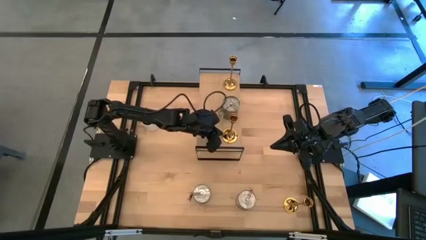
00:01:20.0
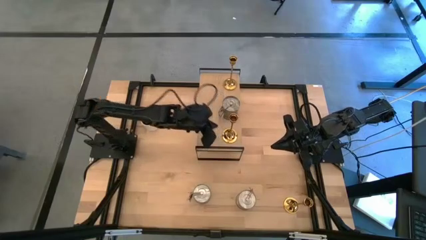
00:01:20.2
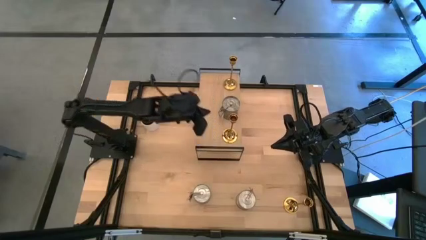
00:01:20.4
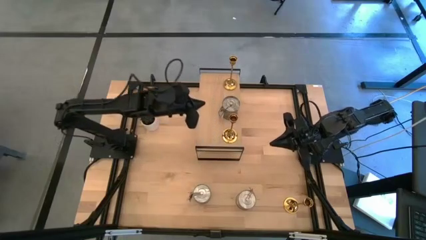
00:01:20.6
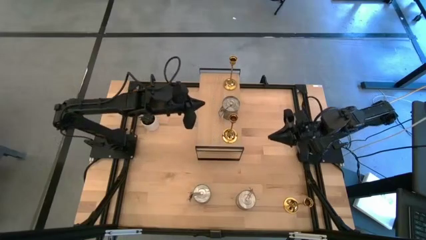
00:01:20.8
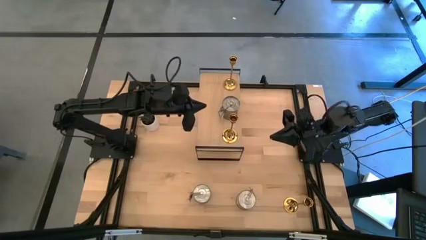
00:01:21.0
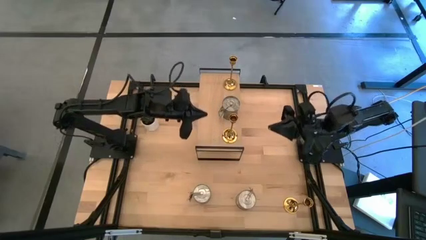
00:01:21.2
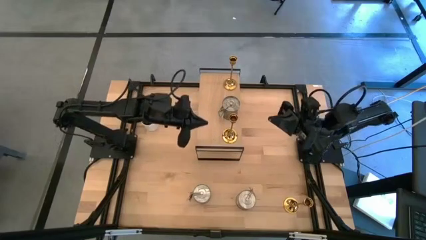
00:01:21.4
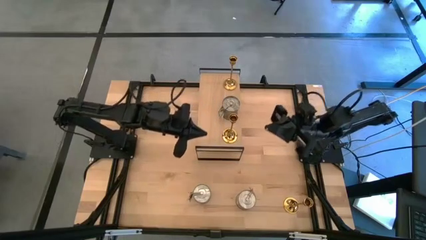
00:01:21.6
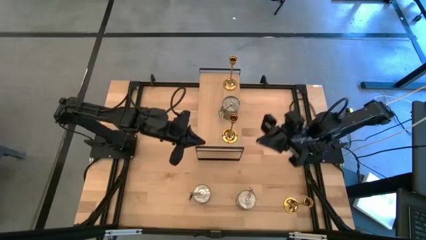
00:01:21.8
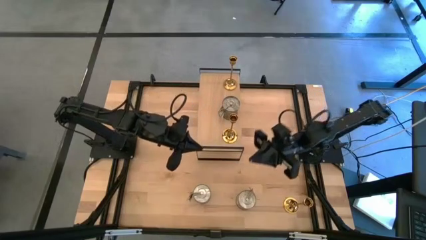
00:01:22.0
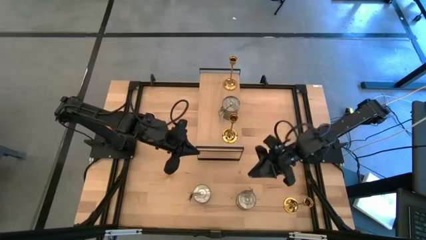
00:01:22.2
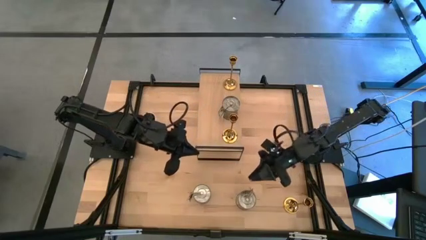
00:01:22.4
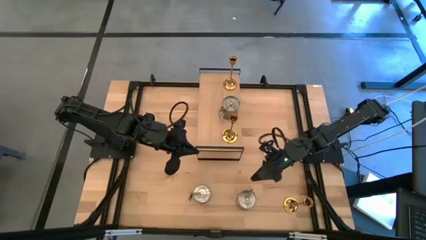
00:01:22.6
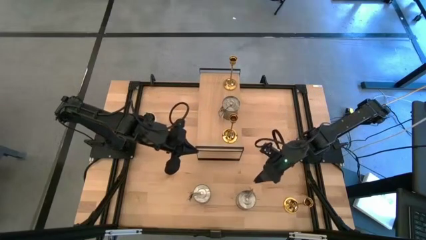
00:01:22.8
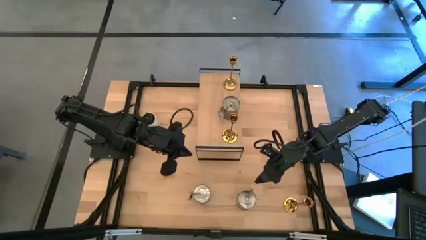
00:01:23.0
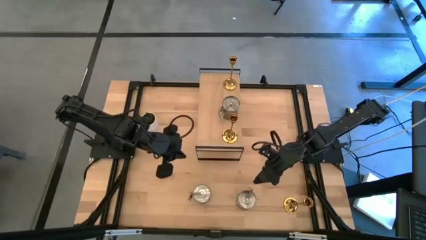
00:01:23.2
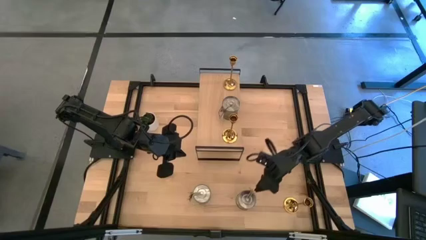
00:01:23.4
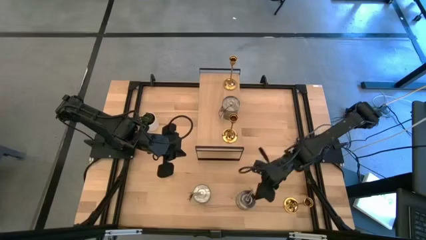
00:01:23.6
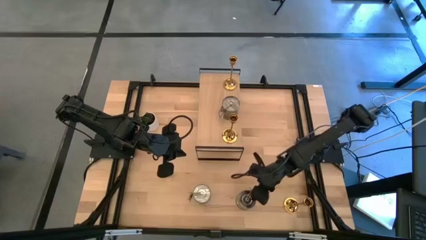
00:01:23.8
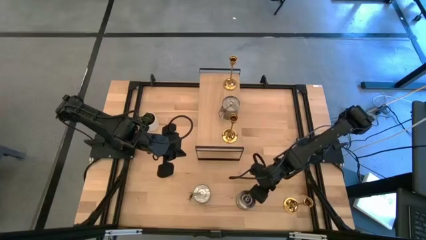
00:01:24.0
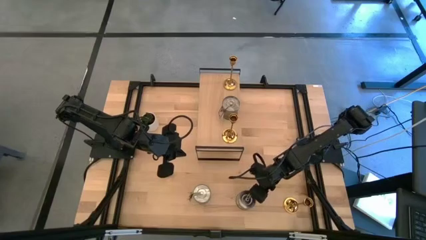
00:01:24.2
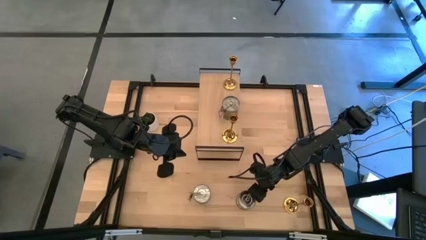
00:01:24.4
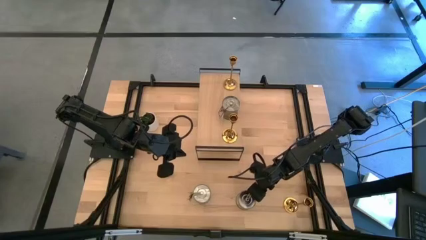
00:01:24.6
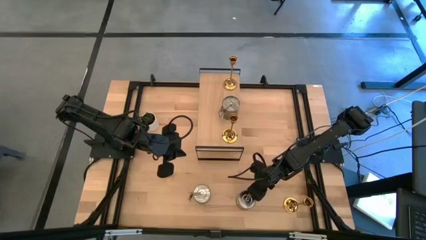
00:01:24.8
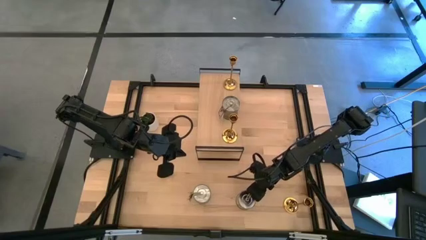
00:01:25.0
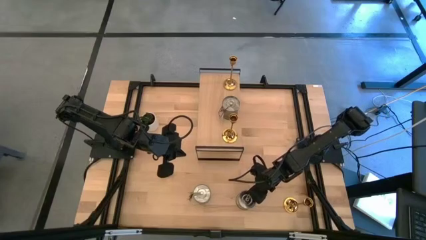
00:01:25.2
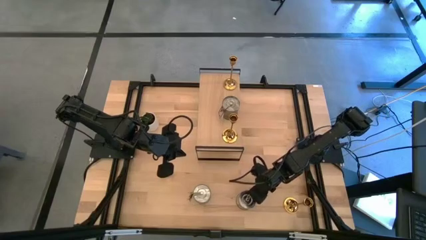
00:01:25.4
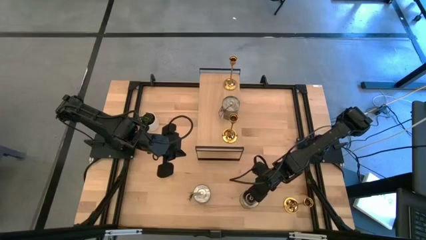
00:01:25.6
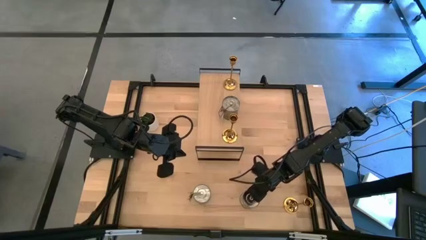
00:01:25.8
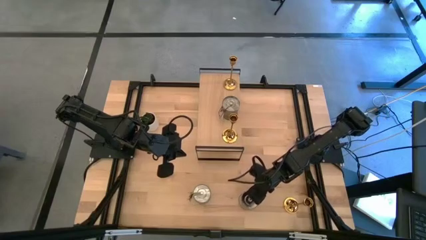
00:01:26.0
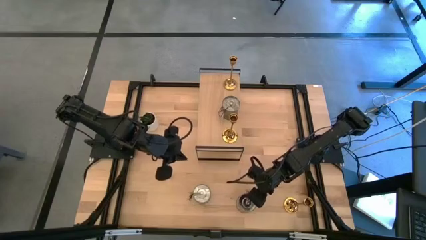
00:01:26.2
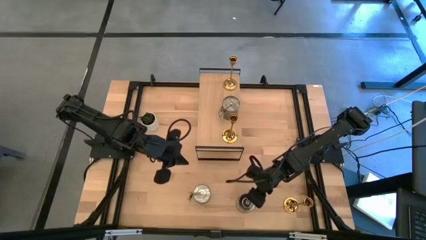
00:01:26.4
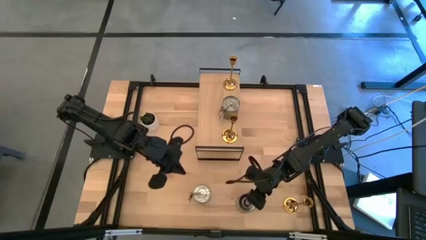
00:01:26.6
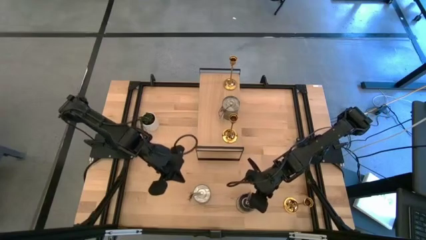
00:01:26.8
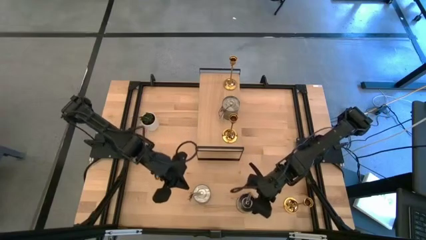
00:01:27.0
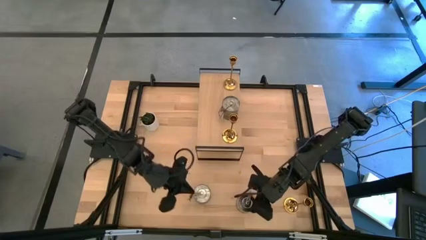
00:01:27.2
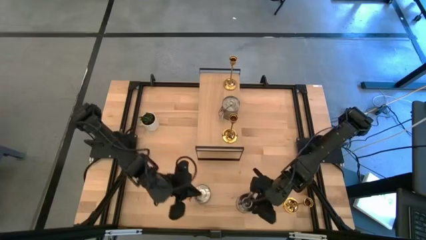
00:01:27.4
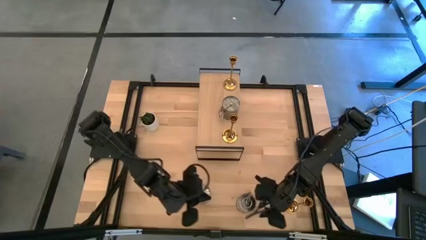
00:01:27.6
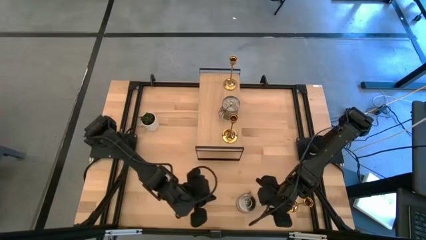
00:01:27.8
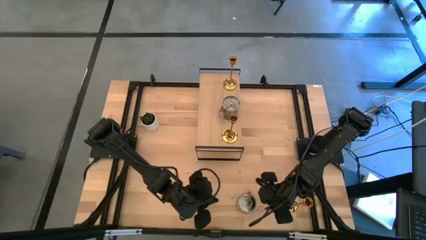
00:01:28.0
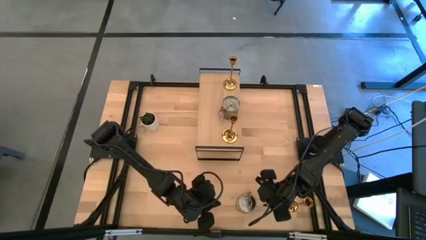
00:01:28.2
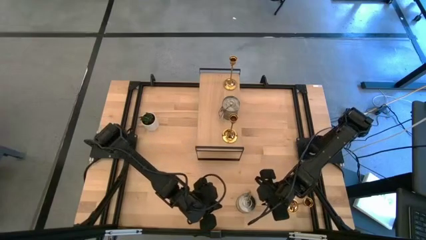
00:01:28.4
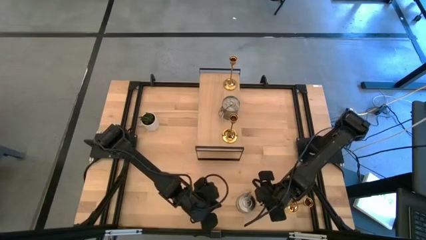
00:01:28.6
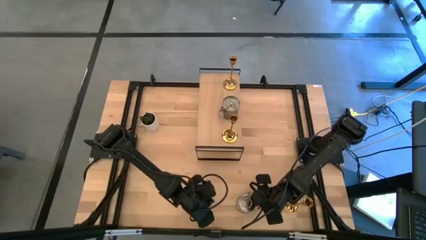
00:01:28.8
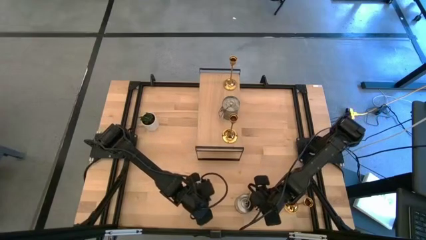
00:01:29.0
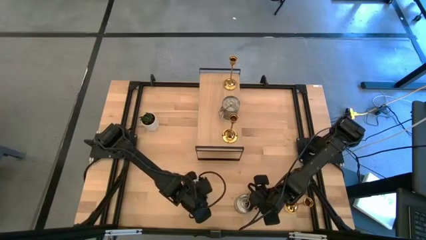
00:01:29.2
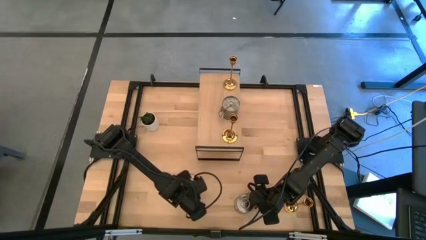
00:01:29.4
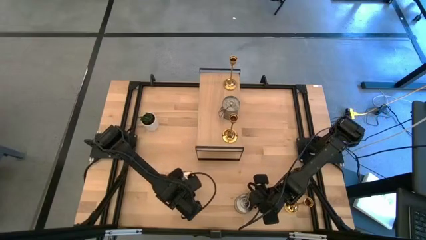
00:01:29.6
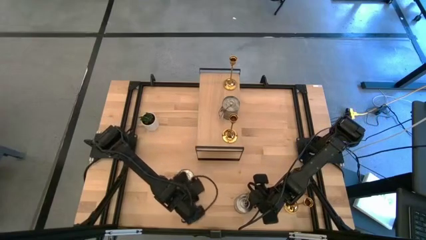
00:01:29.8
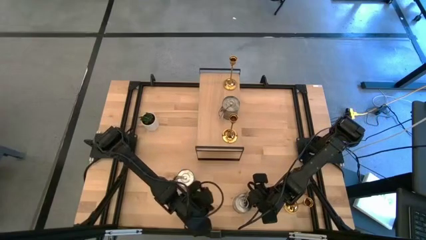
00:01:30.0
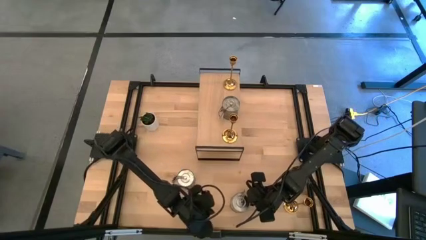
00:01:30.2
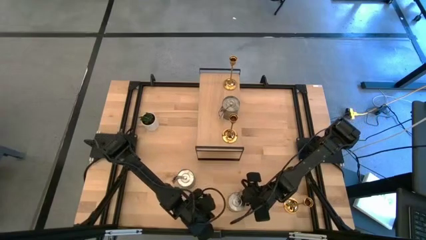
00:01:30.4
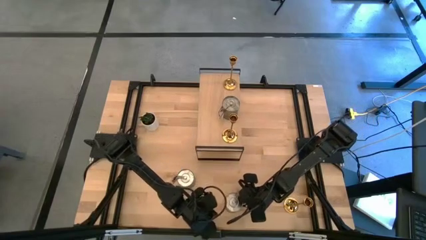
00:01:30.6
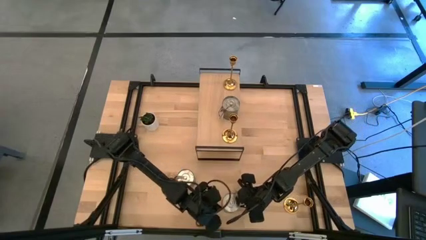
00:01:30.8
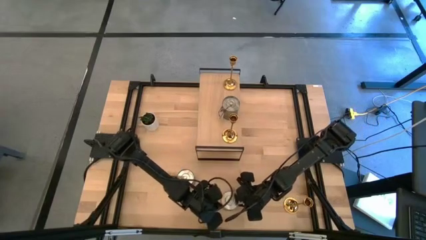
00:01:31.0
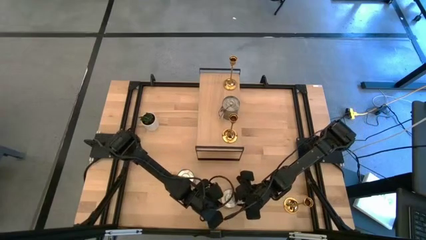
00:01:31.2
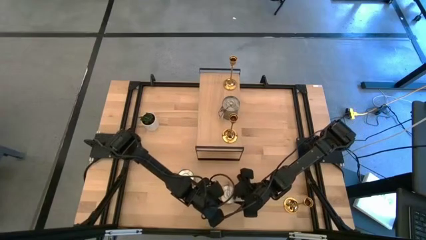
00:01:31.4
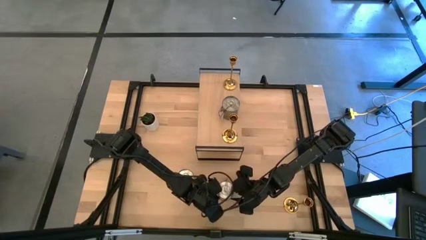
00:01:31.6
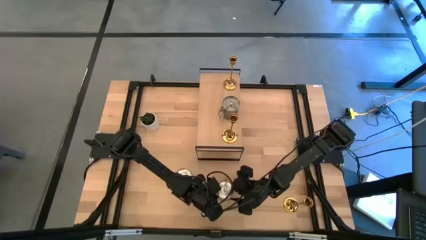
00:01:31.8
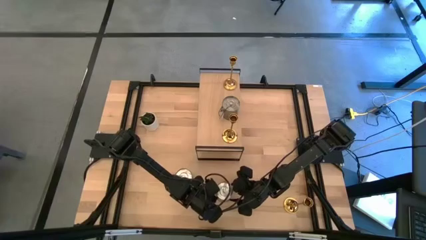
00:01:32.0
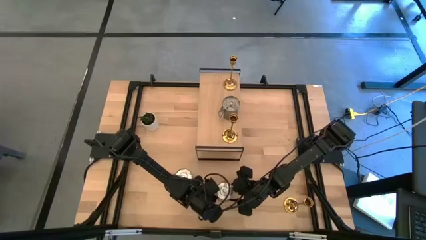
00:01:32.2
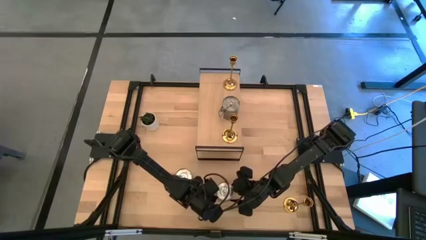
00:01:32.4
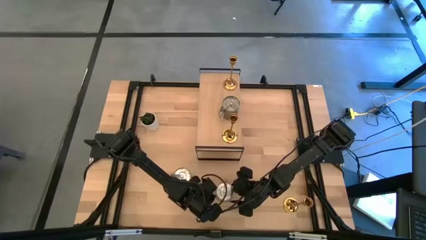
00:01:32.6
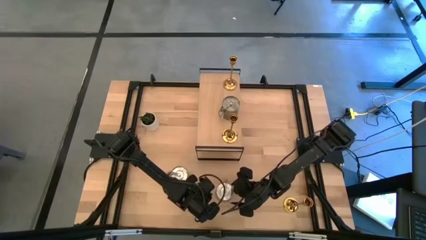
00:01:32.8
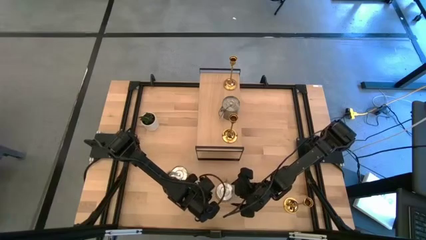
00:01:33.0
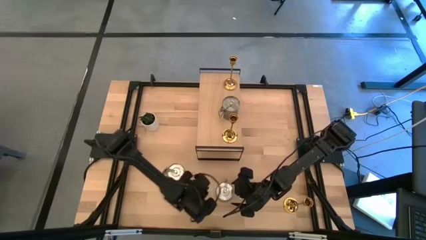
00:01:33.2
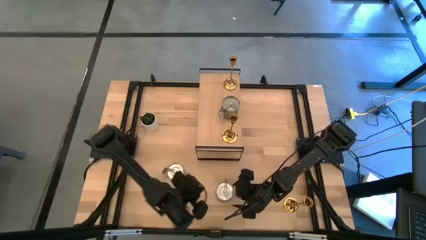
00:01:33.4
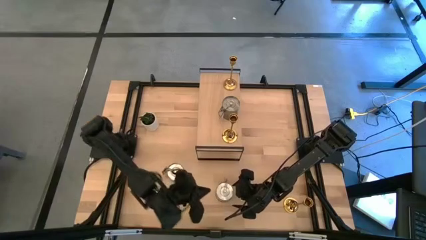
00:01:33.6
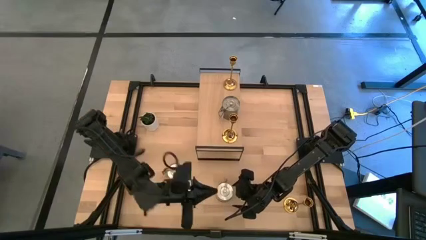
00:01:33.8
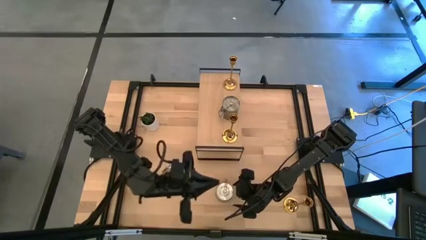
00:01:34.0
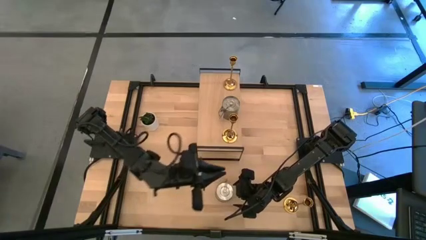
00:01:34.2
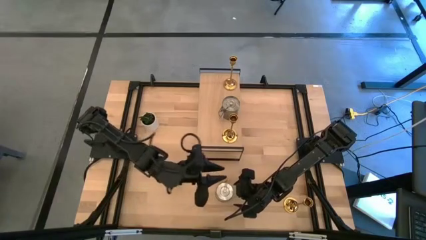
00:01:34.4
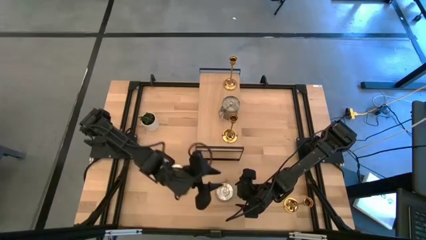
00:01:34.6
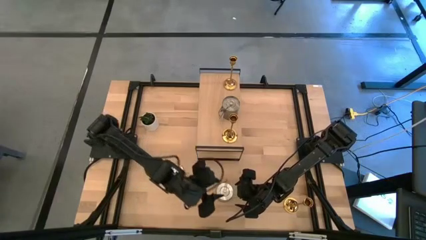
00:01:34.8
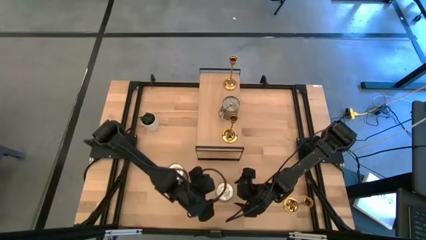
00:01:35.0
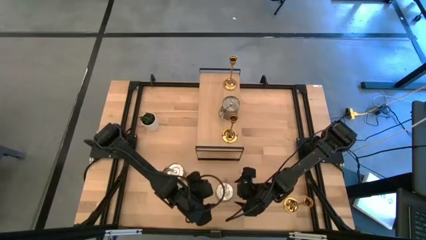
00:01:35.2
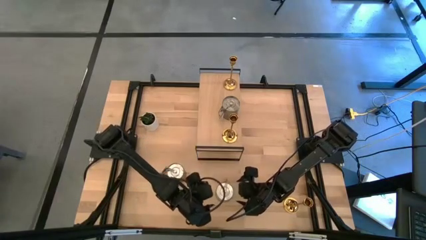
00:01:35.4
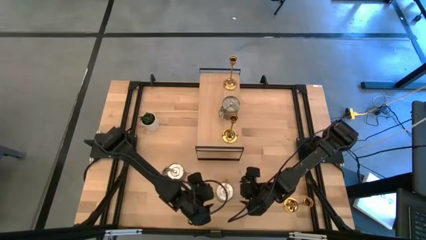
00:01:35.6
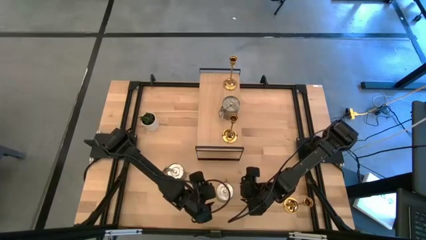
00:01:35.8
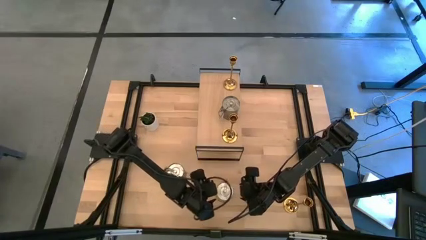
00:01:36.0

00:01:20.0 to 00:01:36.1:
Task: Pick & Place candle stick holders
Put the right silver scented candle on the shelf
